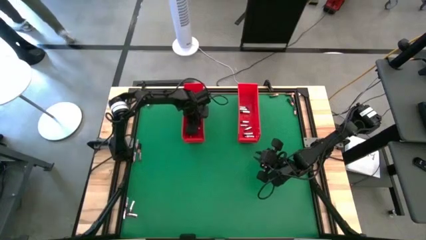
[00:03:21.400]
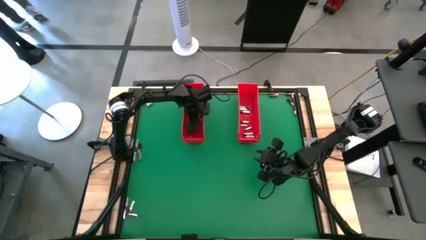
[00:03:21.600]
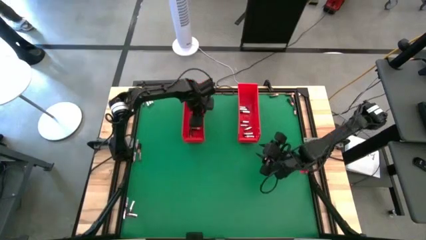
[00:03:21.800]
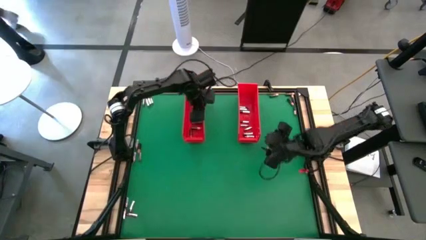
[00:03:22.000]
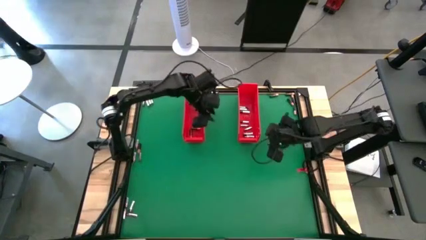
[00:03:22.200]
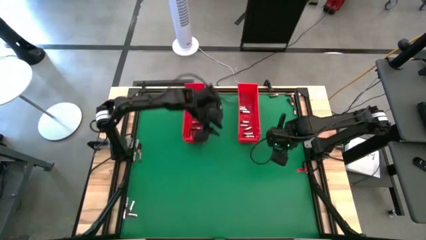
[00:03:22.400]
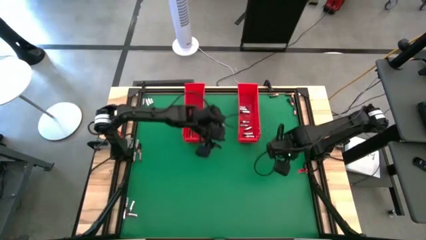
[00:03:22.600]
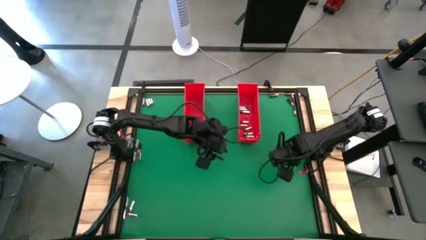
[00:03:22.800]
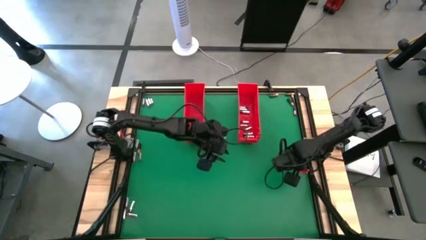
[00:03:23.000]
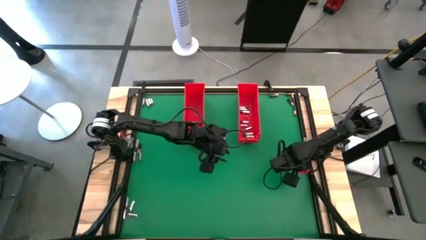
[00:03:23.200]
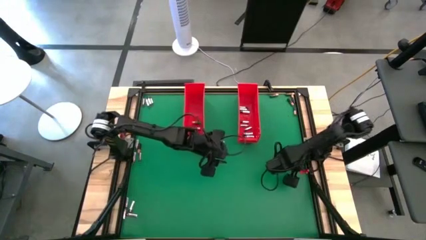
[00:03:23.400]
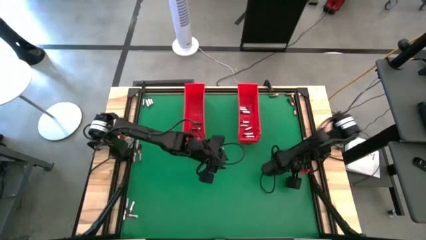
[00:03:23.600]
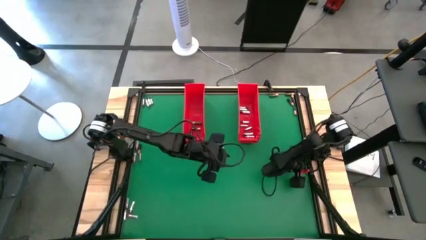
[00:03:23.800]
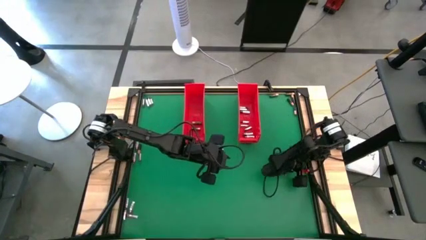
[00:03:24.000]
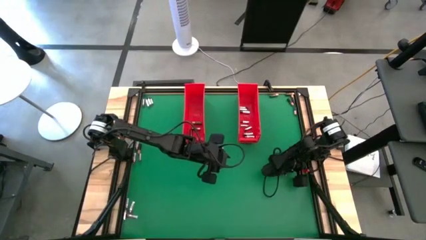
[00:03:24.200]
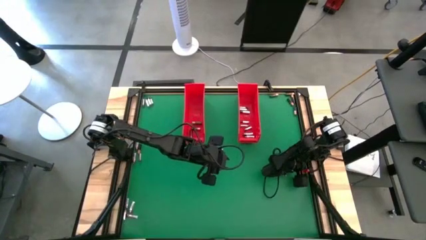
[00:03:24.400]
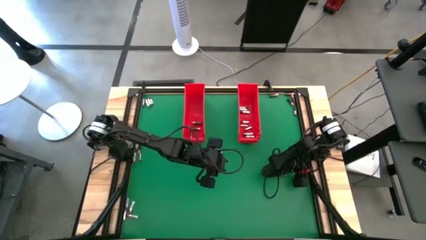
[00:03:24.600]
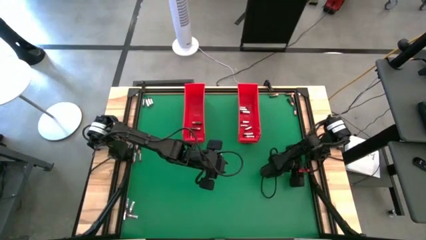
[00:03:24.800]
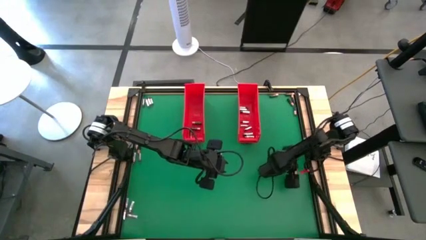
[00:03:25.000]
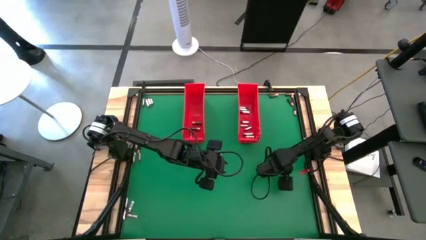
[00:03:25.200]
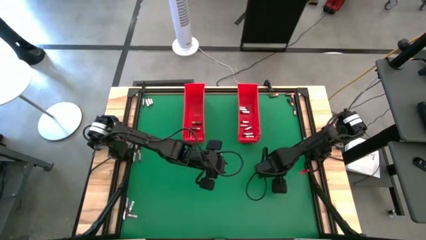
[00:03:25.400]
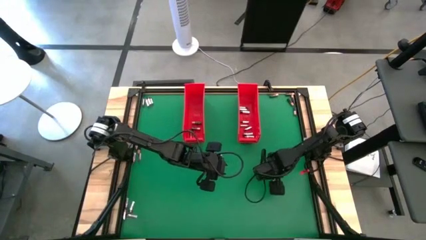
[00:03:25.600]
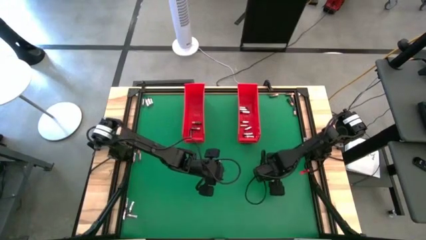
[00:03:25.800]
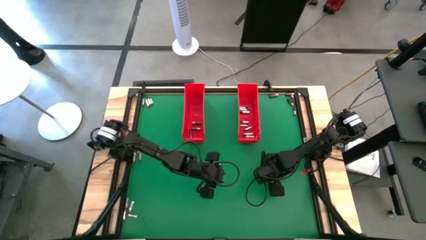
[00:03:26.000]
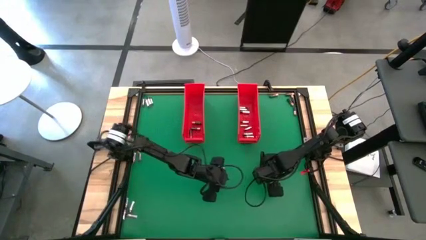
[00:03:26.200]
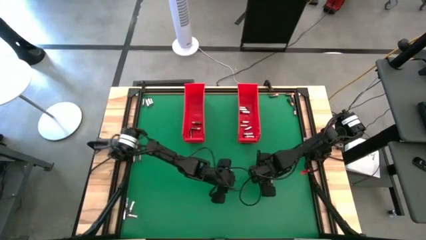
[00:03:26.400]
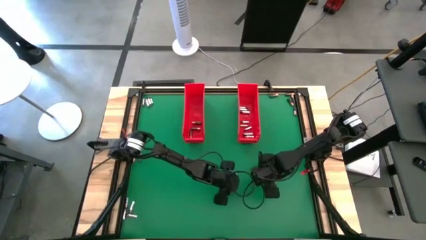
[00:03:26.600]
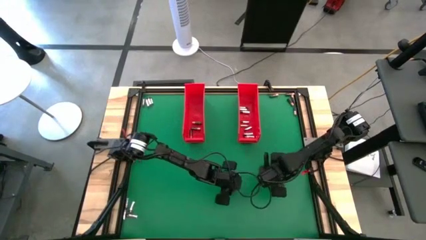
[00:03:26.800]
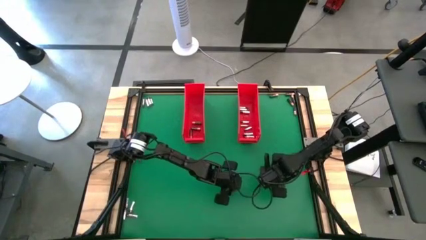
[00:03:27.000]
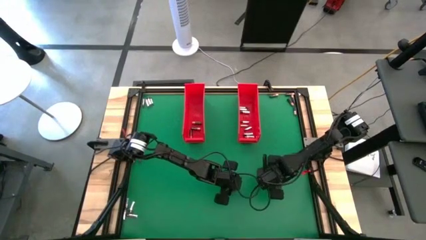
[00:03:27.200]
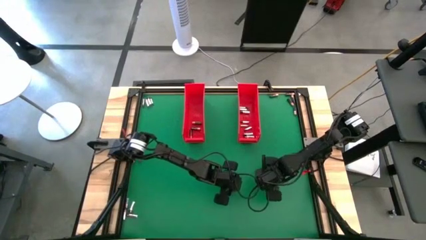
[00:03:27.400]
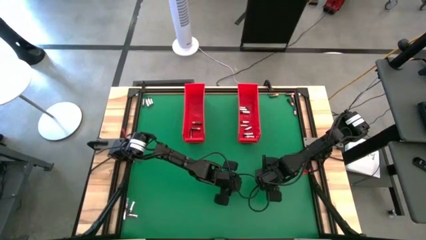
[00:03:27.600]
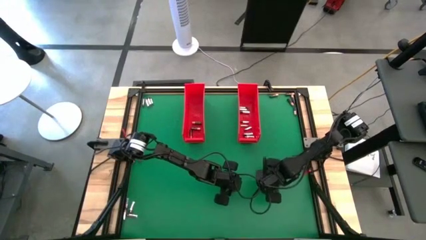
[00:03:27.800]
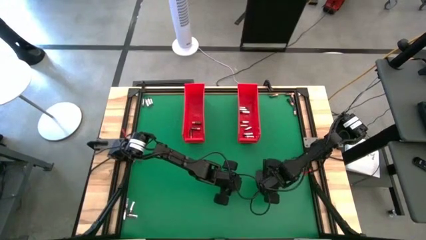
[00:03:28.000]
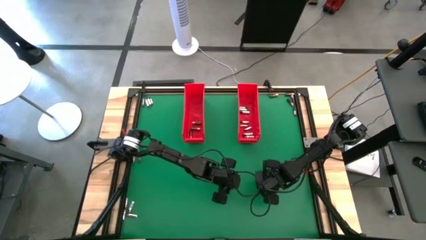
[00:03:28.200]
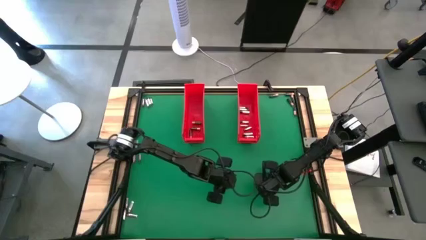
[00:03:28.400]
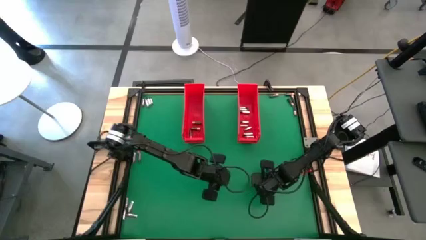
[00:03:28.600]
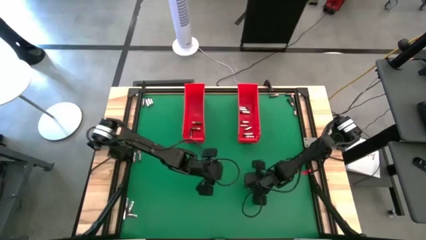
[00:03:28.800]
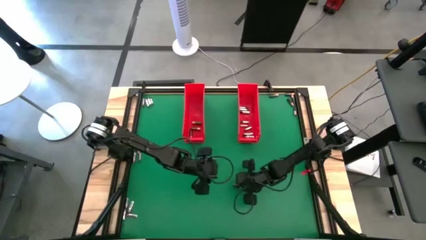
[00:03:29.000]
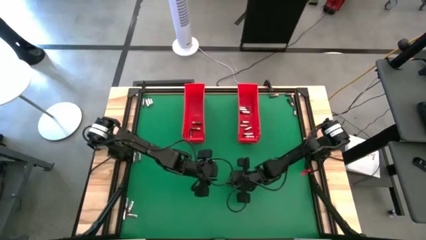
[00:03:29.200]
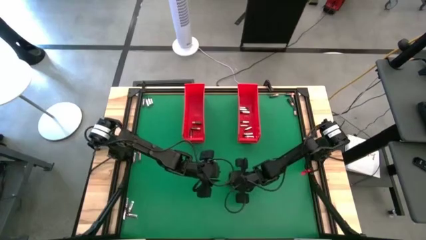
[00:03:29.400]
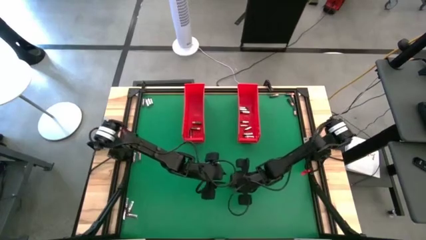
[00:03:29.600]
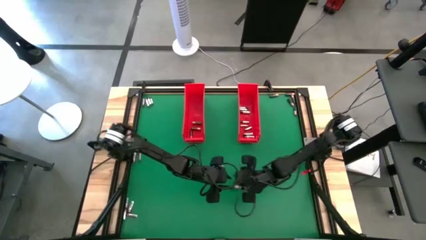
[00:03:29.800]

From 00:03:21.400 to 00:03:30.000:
Task: Sort batteries
Put the brown battery into the left red bin

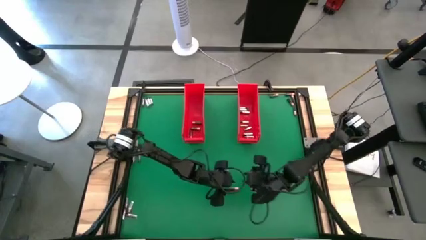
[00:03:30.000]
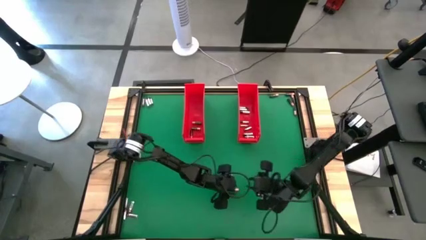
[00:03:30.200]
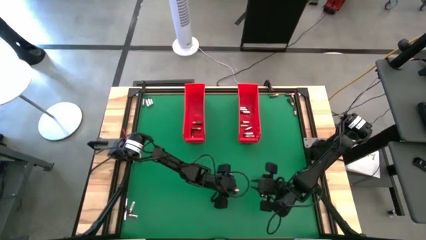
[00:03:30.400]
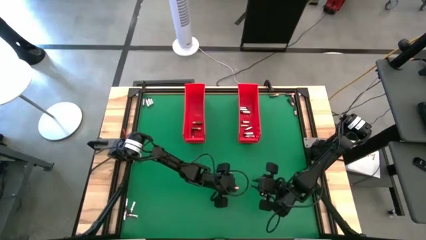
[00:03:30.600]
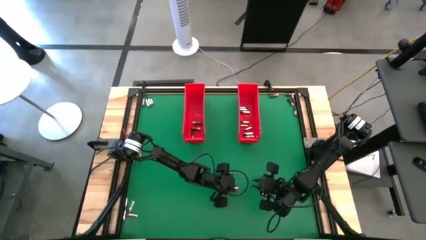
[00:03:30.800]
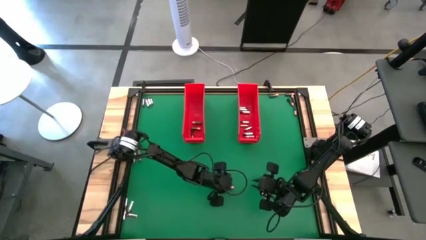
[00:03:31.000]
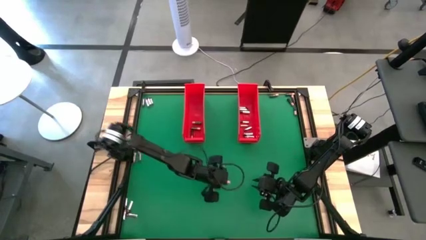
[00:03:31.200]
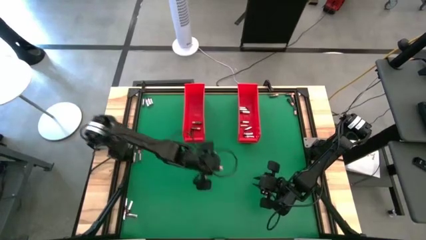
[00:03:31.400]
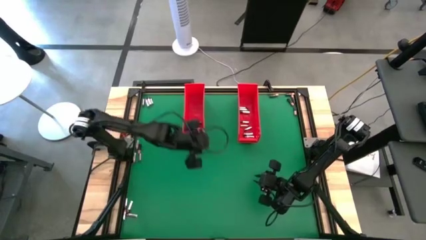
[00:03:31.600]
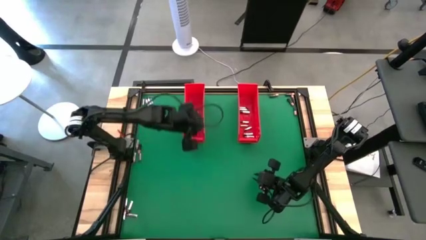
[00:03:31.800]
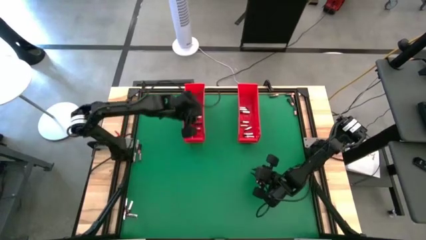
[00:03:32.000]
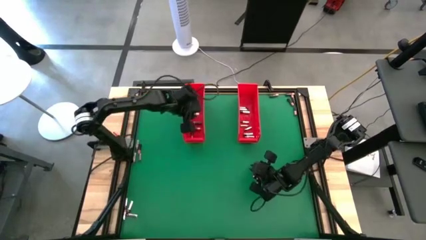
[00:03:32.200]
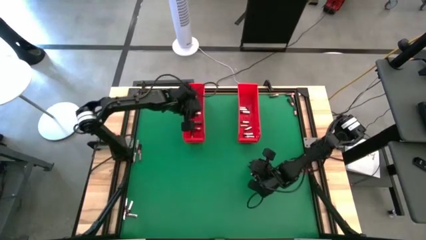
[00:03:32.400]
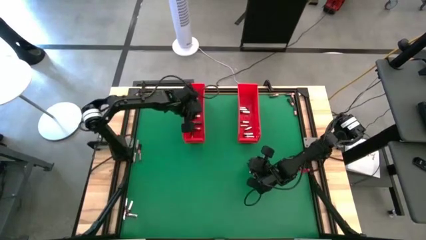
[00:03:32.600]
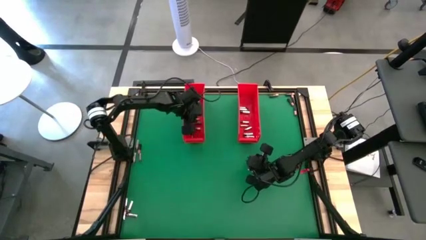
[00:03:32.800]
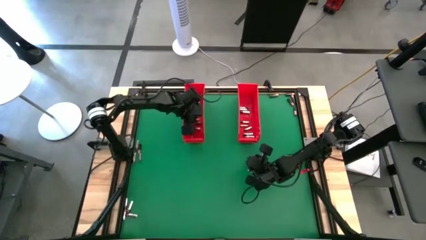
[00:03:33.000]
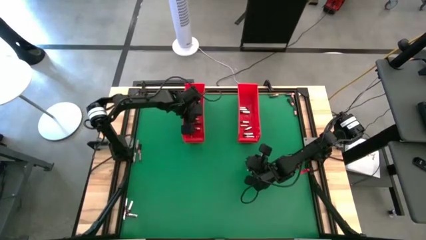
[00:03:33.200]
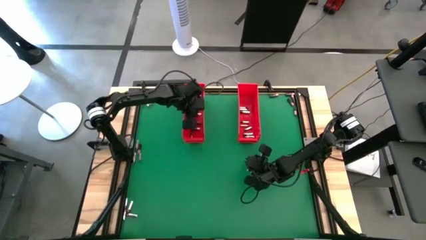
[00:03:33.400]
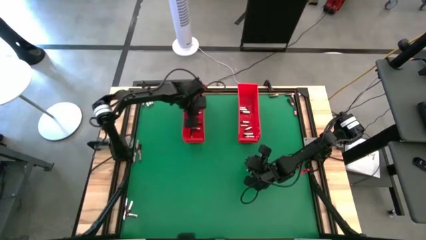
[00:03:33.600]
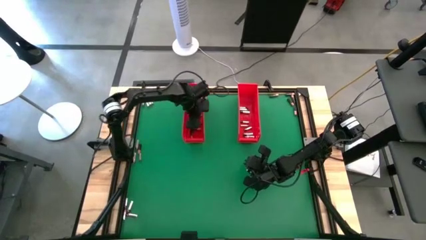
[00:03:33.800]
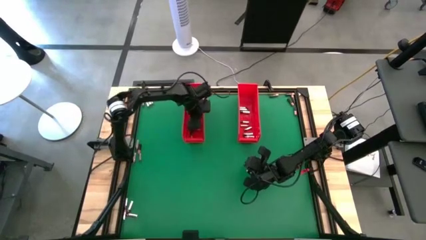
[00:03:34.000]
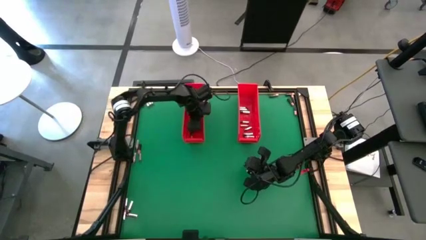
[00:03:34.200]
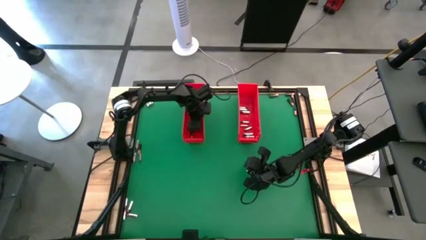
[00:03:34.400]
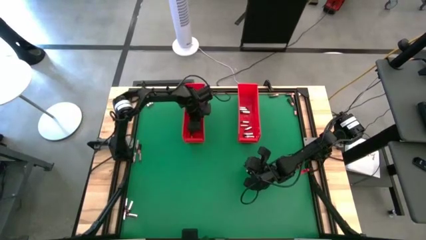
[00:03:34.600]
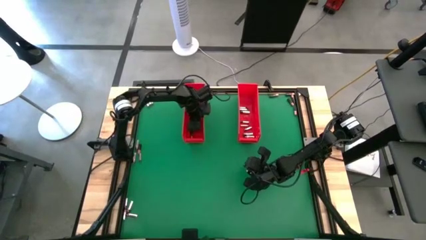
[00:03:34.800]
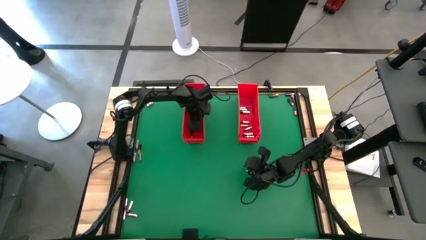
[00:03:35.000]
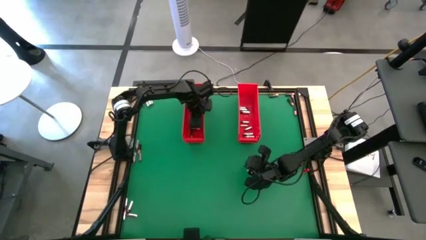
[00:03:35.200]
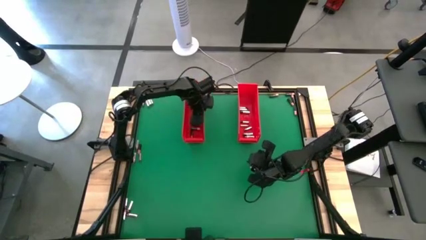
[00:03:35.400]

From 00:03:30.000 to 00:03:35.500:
Put the brown battery into the left red bin

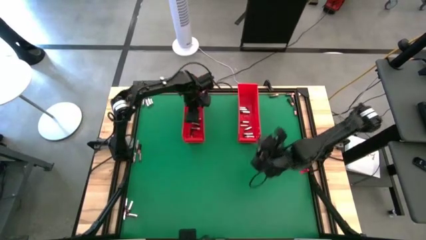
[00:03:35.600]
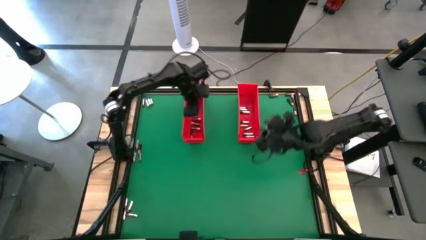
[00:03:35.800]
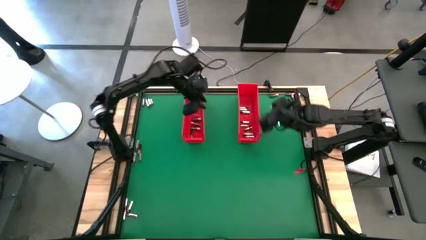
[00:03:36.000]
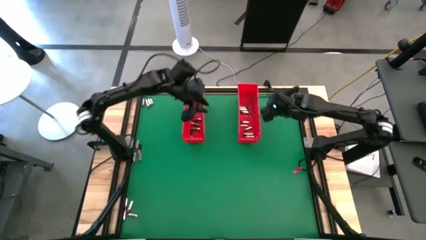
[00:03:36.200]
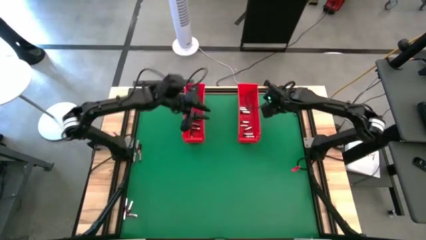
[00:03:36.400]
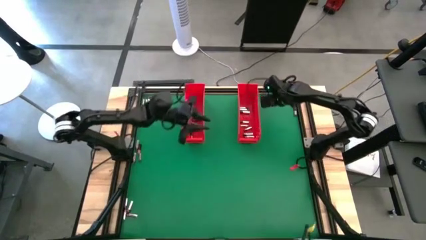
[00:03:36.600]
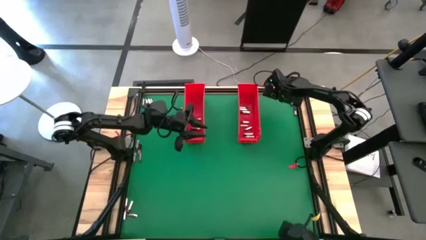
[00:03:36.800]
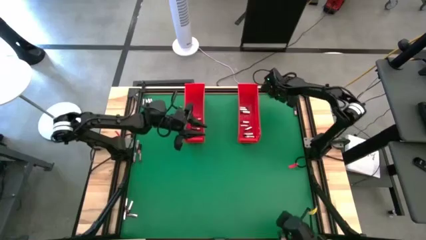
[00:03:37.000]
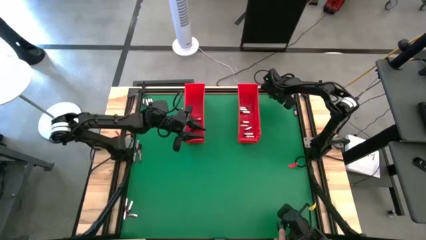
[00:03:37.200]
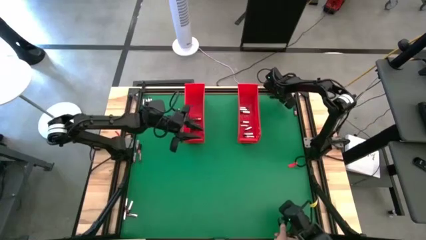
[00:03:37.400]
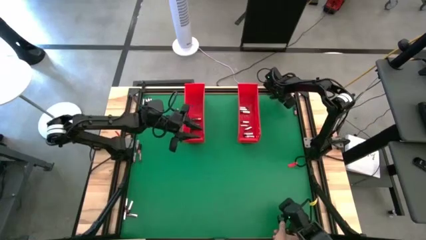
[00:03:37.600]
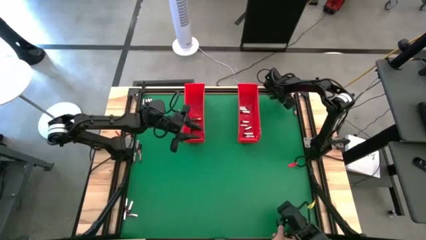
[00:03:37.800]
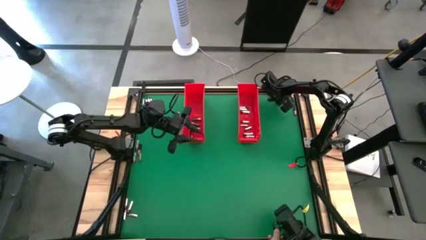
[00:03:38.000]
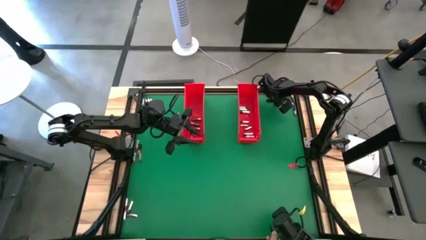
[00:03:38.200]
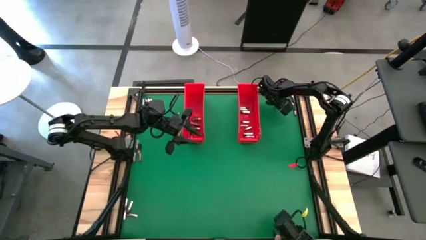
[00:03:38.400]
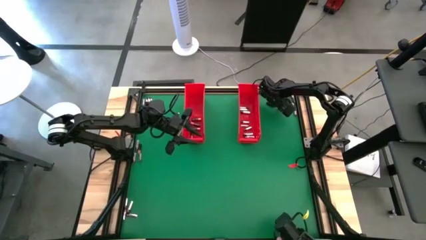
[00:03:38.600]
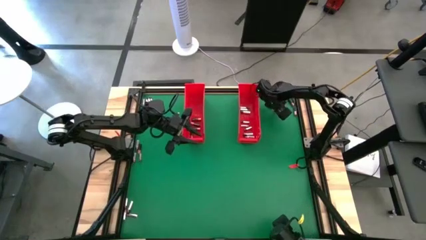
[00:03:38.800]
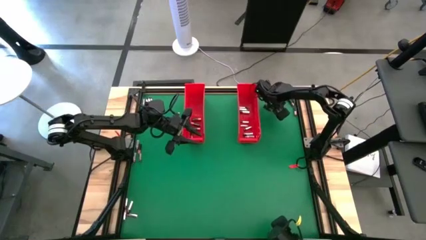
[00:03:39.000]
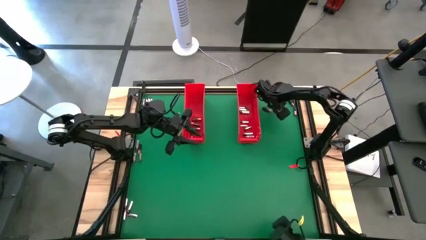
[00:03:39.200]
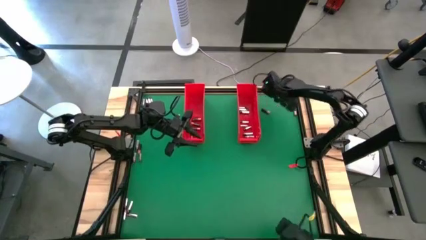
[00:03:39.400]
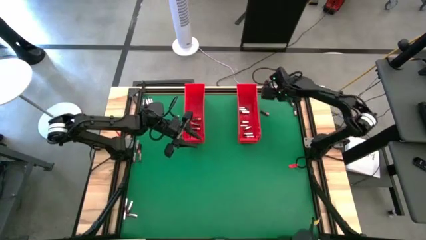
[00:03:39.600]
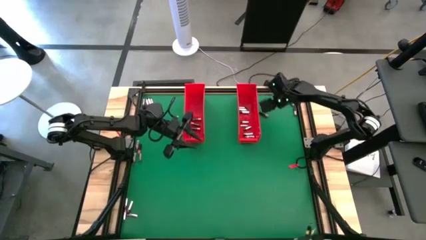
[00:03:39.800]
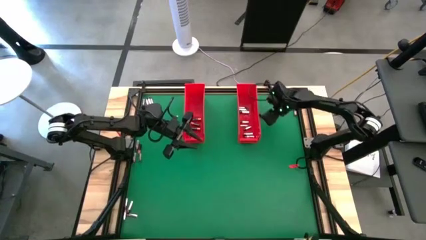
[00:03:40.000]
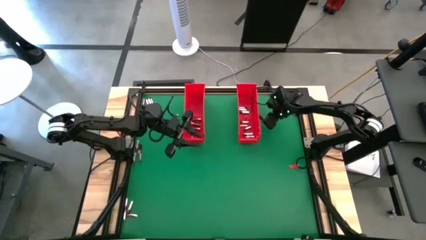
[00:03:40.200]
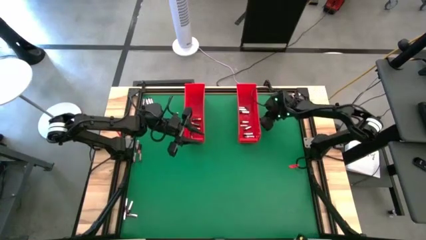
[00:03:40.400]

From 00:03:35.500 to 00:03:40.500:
Put the brown battery into the left red bin
